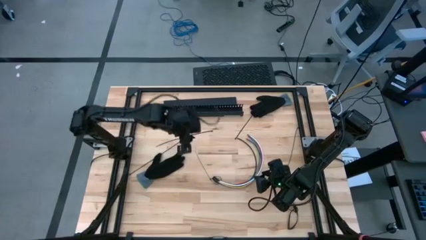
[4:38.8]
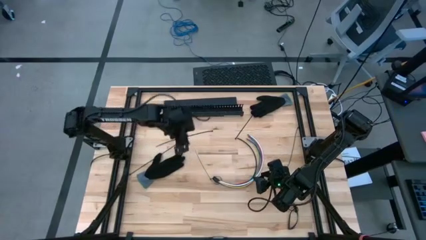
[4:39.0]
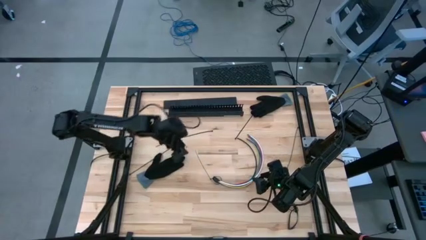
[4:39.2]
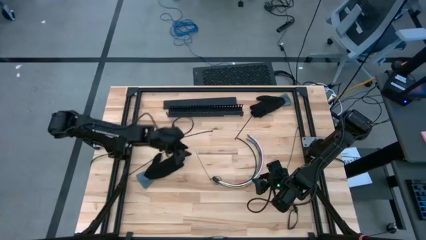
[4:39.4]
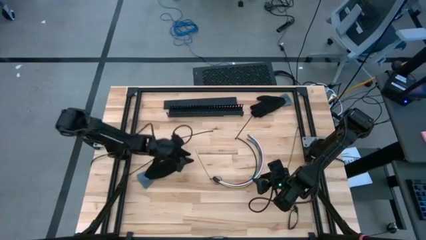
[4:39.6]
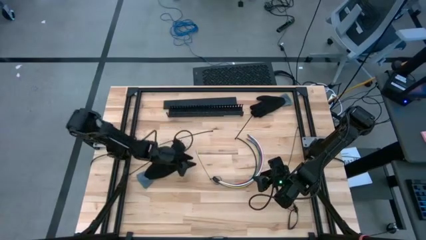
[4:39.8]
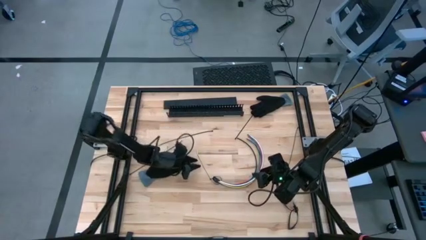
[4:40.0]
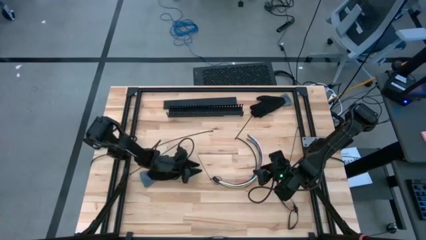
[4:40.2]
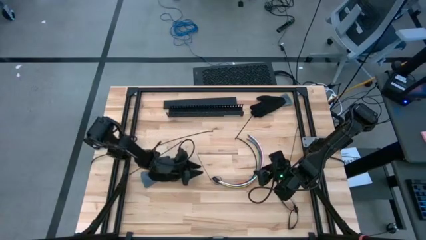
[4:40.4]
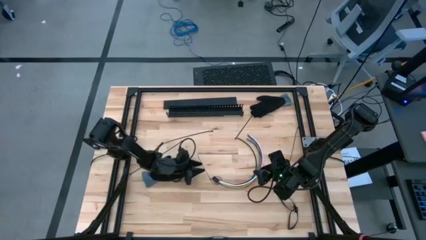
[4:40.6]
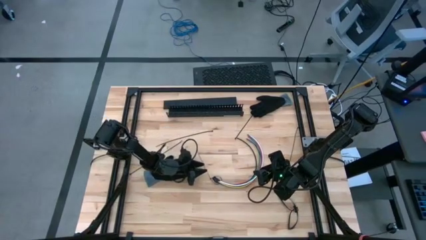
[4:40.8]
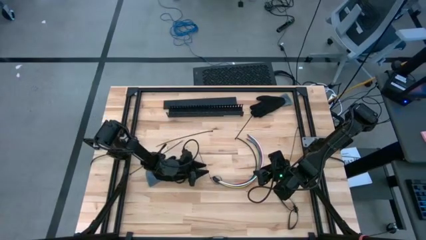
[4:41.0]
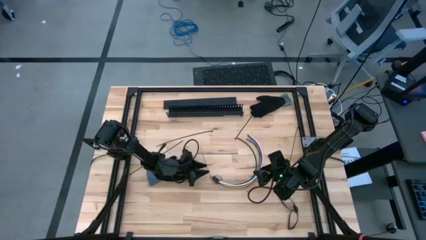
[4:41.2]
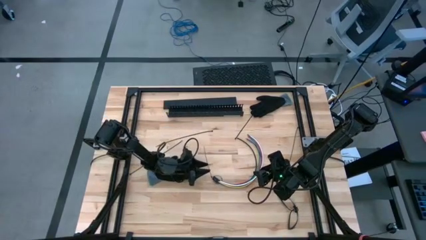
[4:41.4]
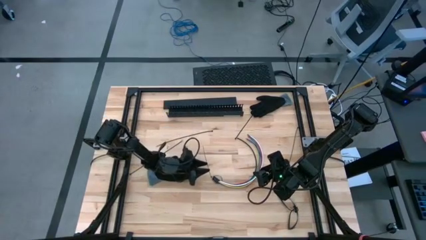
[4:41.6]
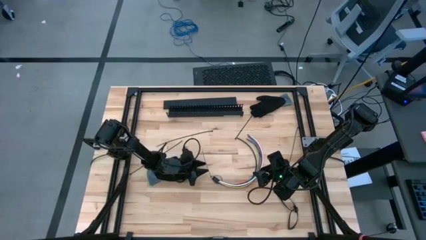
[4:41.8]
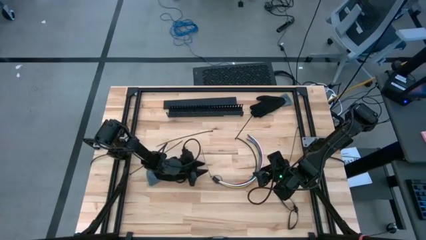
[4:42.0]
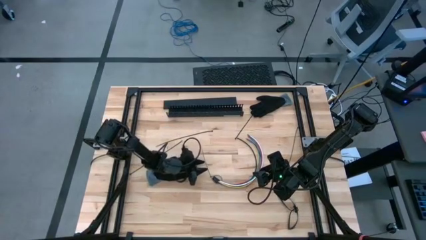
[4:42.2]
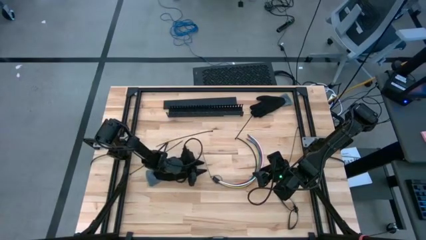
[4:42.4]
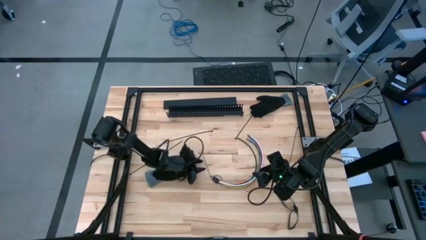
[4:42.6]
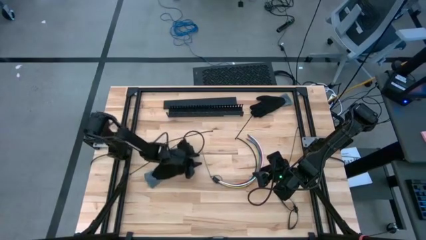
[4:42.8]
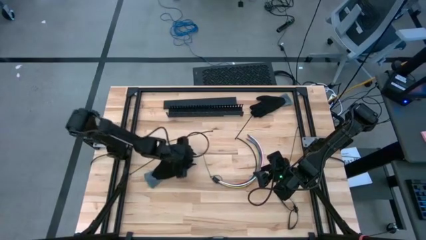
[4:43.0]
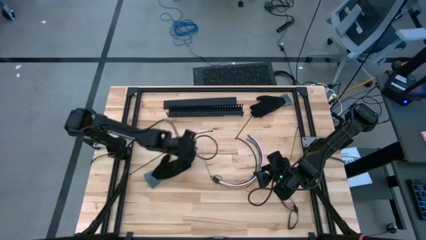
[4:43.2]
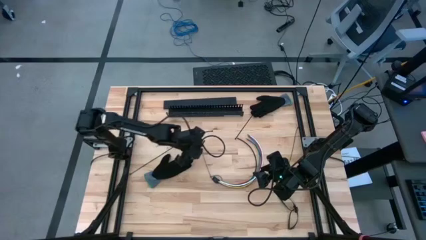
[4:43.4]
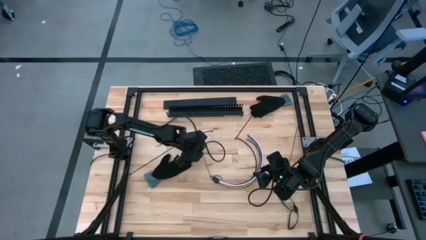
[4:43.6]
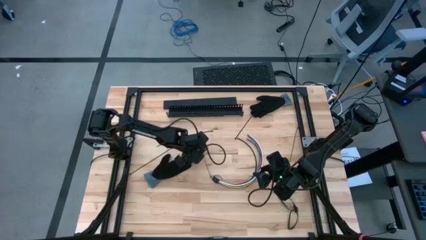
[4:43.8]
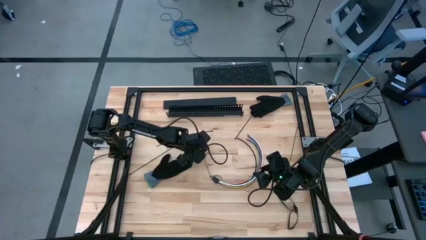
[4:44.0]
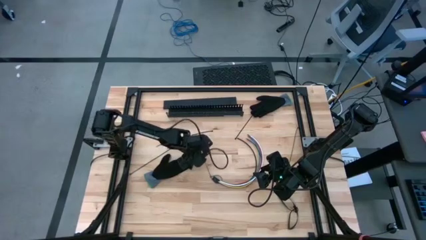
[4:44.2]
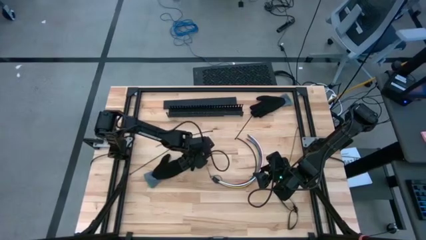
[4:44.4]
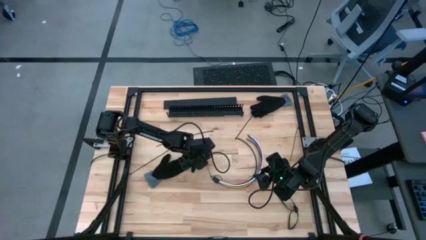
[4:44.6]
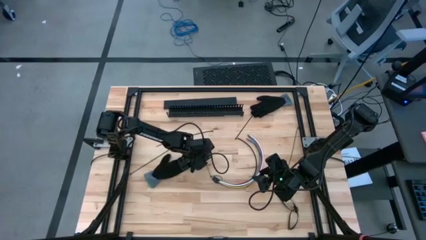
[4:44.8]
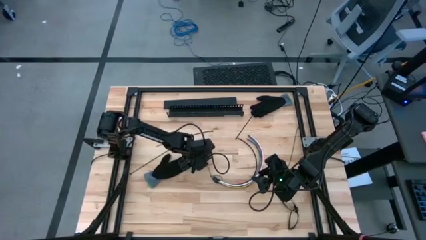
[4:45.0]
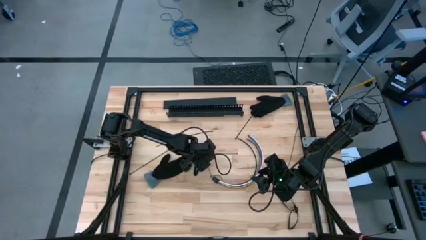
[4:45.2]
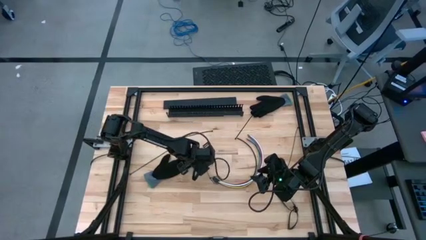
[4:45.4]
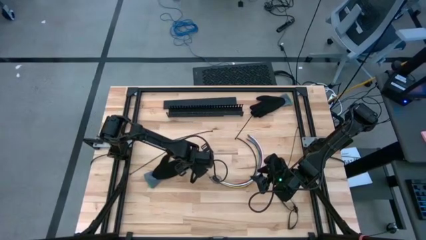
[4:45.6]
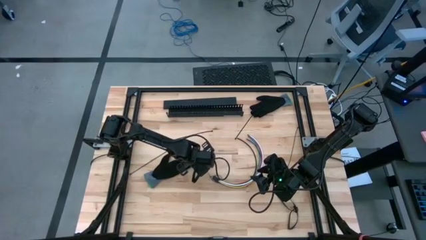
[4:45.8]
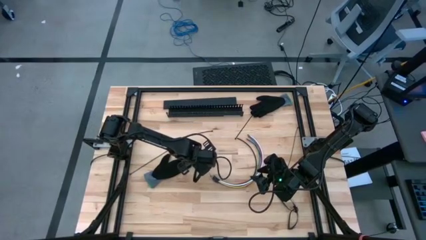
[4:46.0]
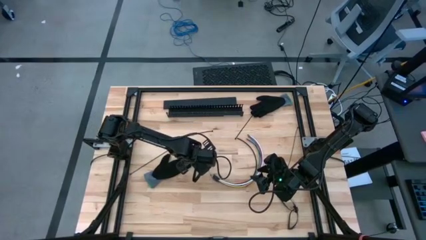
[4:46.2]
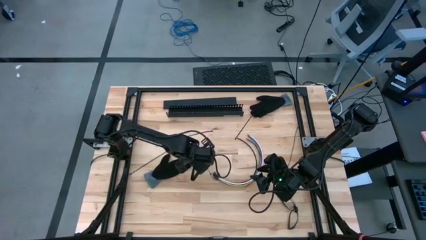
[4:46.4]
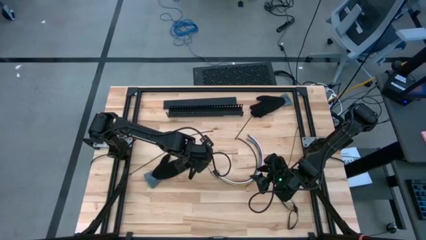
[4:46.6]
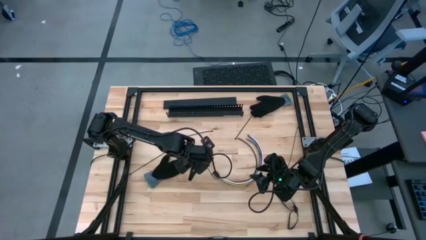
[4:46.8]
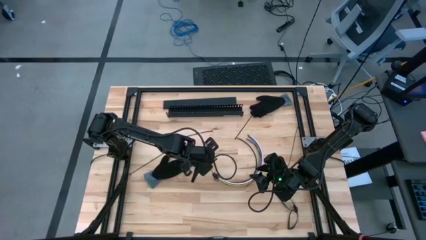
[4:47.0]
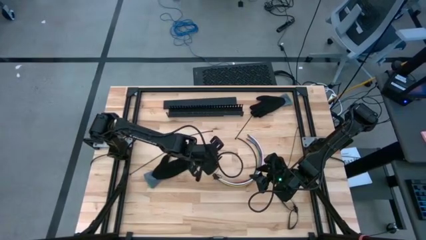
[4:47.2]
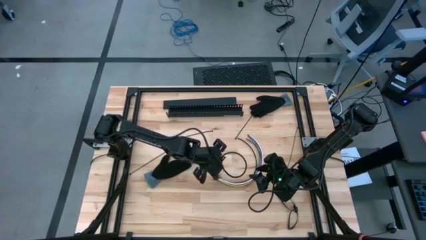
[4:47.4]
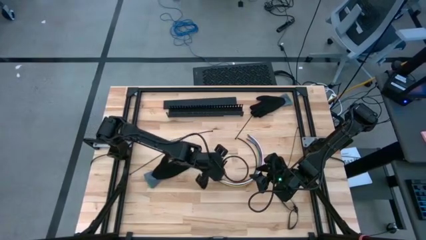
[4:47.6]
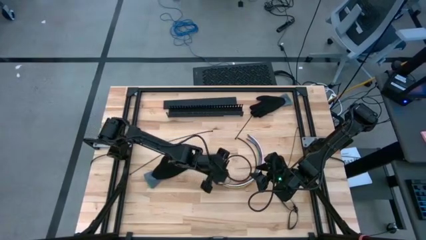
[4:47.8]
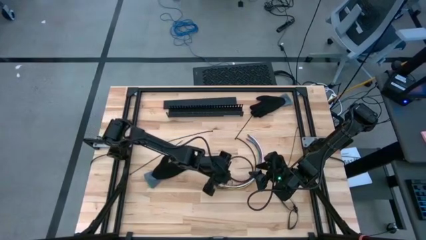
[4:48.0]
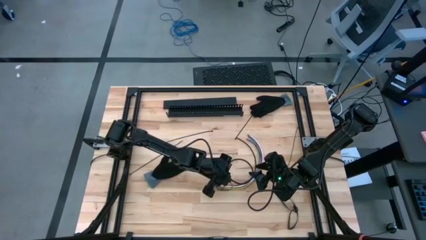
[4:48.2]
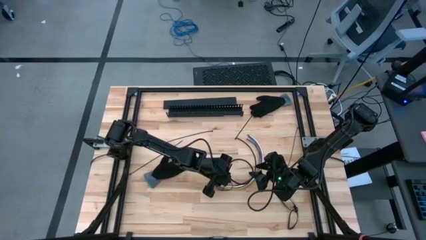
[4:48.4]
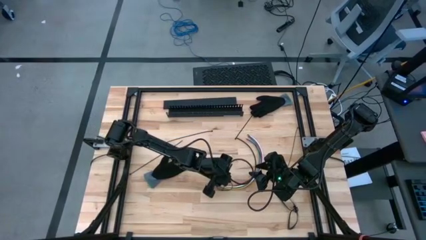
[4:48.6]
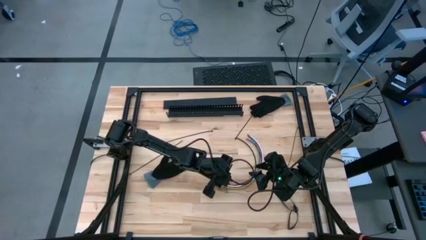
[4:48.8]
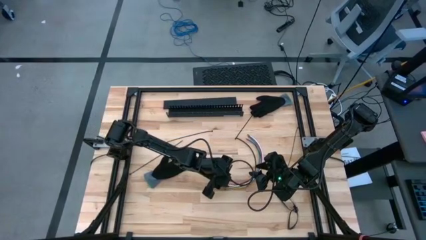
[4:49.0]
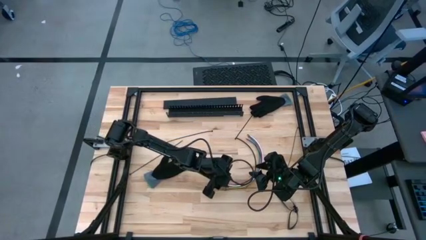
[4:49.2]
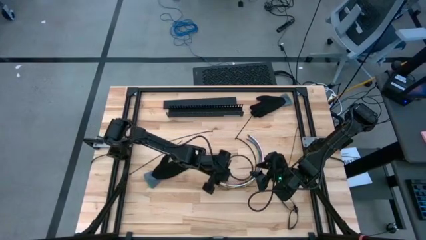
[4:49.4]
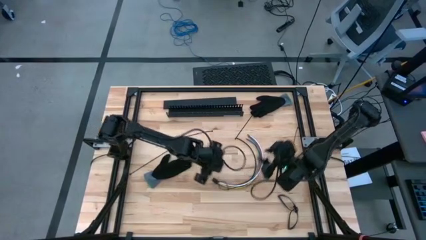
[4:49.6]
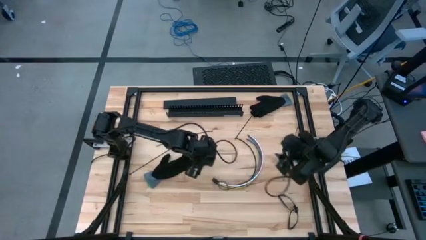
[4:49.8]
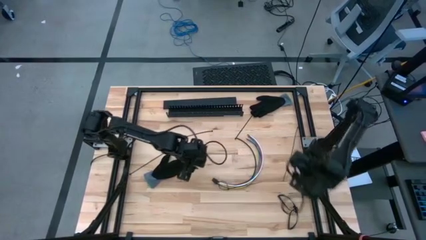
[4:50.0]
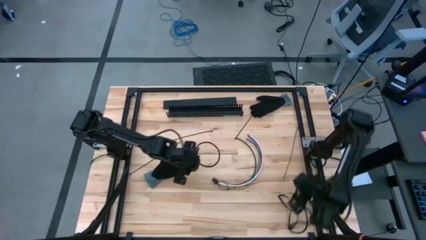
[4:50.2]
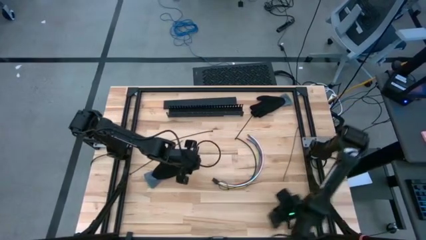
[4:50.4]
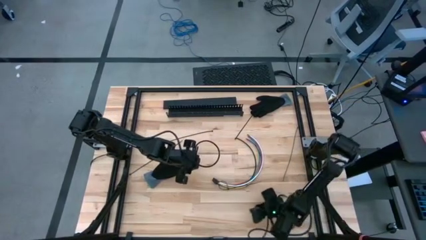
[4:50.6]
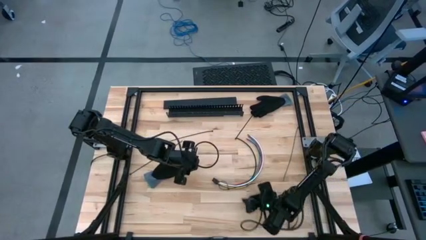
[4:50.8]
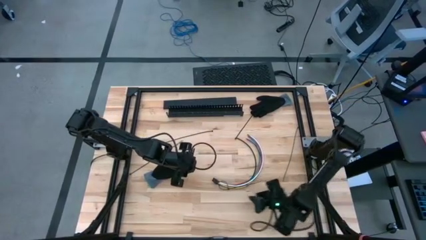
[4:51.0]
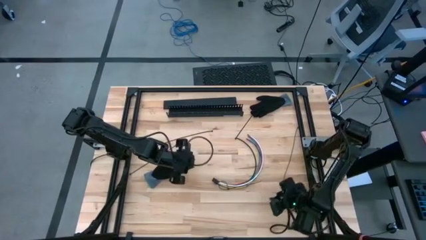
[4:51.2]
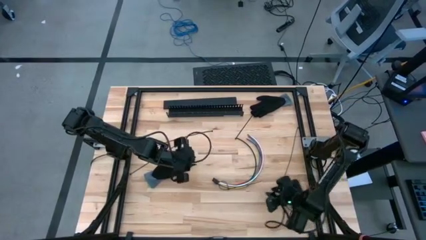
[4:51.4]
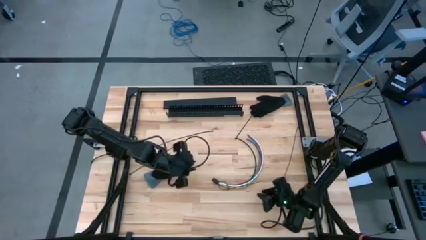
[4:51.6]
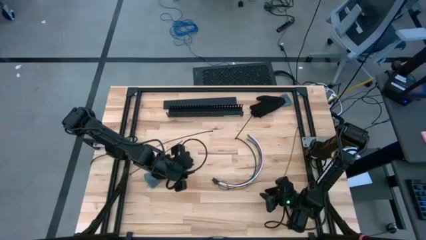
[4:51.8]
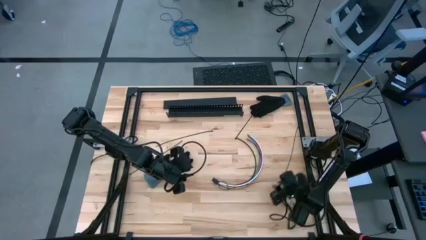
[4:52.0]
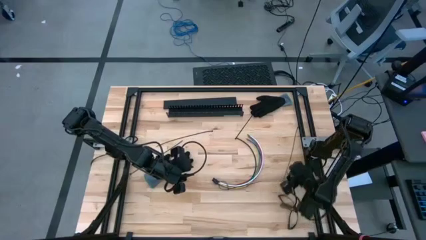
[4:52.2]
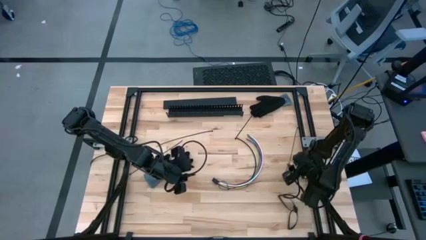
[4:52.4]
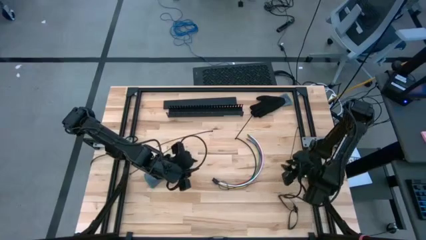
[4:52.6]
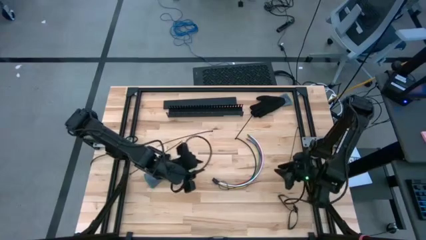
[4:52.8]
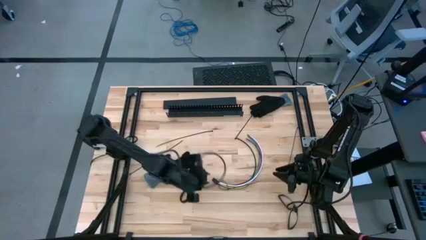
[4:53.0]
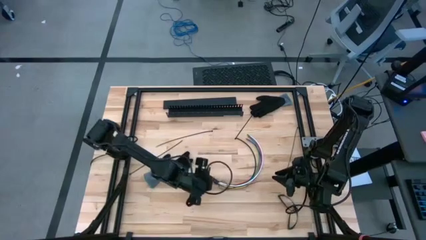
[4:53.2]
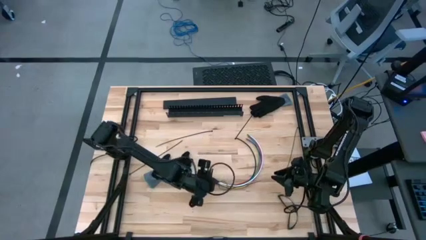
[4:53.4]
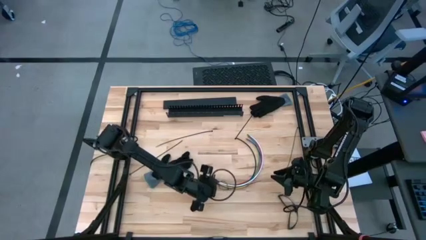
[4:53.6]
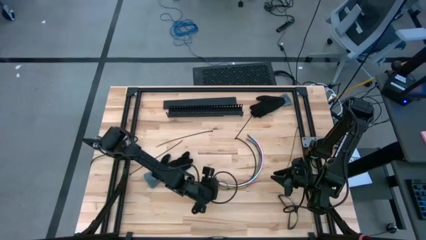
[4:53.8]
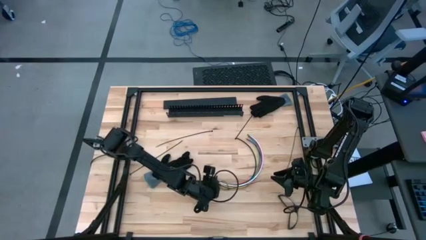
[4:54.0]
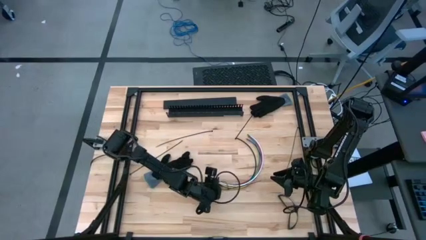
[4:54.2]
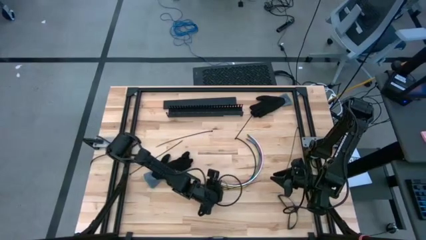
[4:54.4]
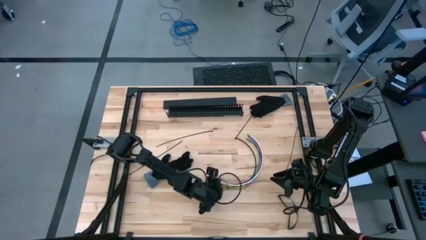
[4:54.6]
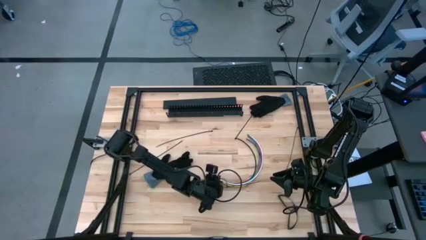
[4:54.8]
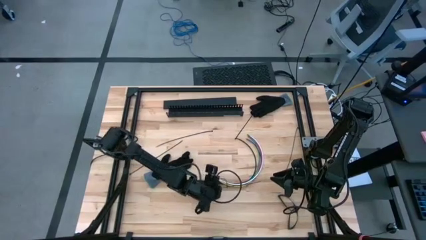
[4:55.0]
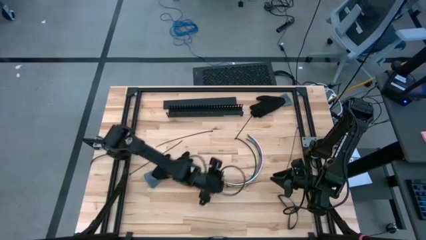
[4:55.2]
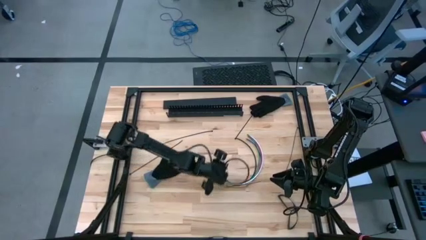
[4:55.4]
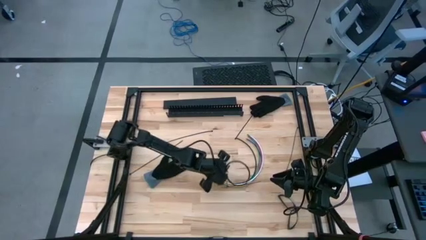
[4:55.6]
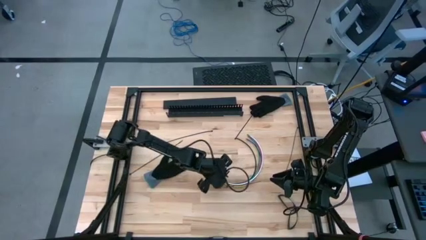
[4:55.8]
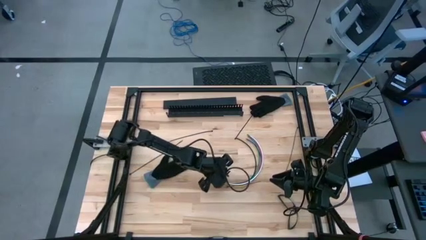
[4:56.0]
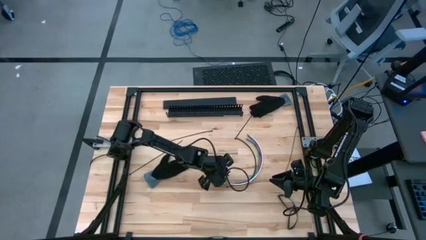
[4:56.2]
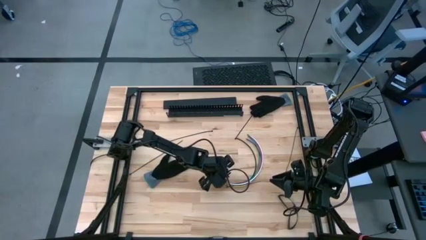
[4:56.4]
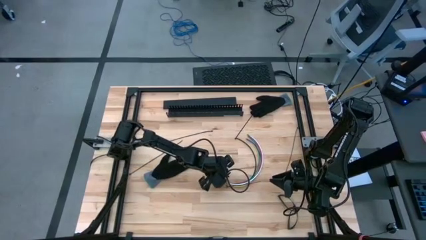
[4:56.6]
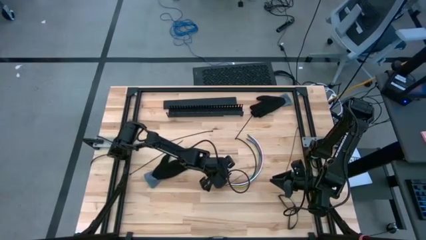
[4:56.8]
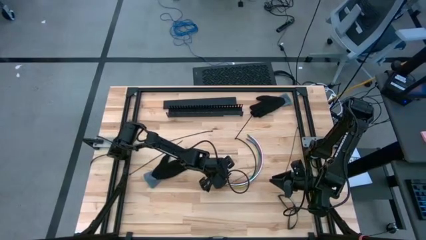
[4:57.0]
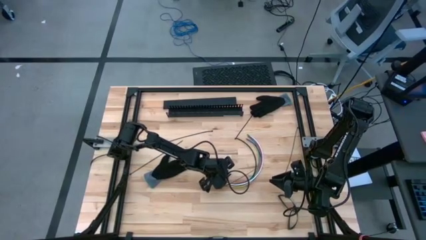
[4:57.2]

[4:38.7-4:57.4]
Task: Ziptie cables
Wrap the cable wires using a zip tie
